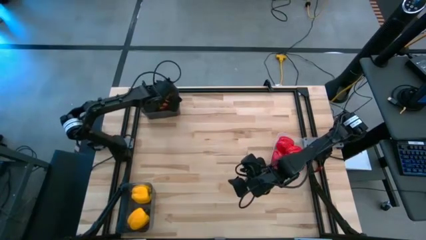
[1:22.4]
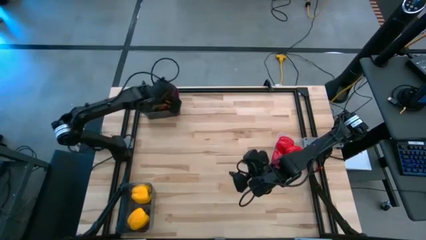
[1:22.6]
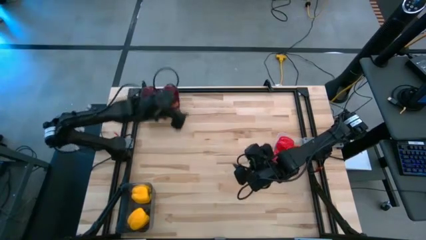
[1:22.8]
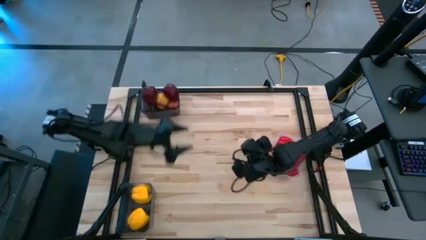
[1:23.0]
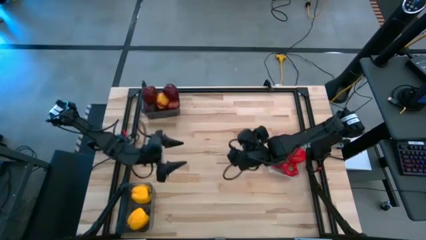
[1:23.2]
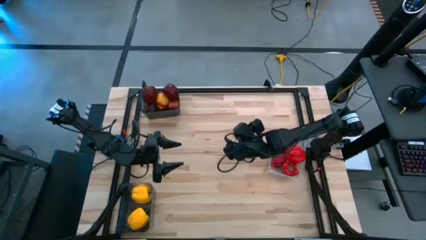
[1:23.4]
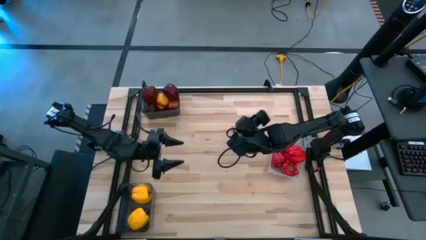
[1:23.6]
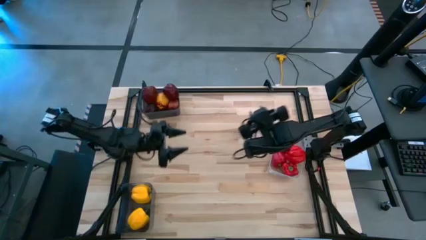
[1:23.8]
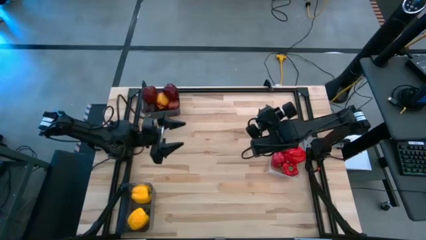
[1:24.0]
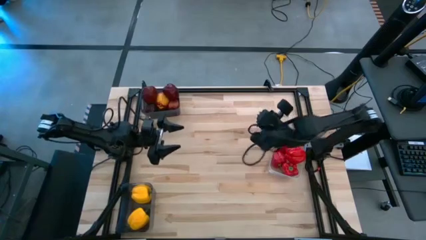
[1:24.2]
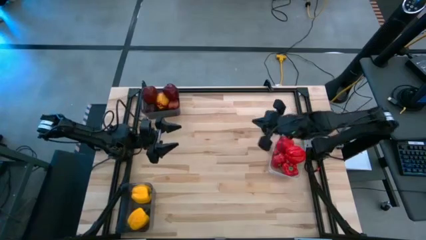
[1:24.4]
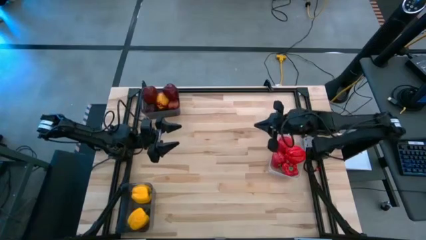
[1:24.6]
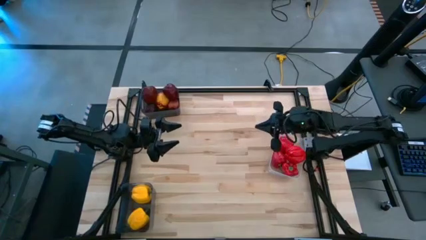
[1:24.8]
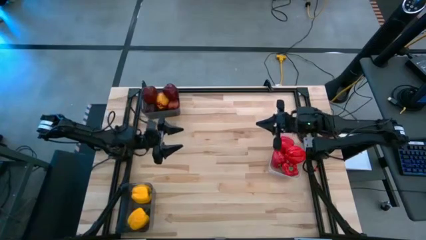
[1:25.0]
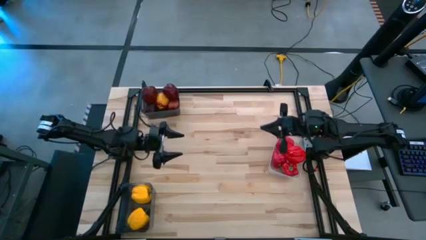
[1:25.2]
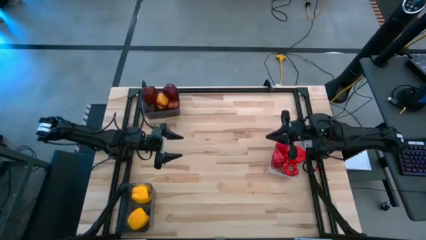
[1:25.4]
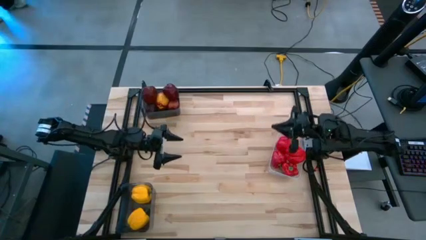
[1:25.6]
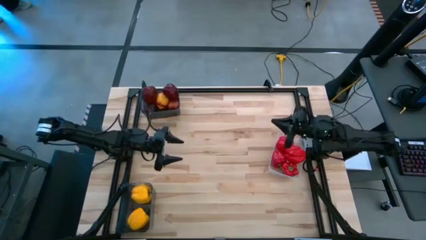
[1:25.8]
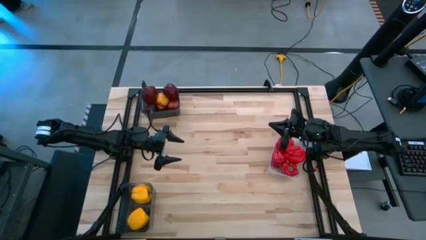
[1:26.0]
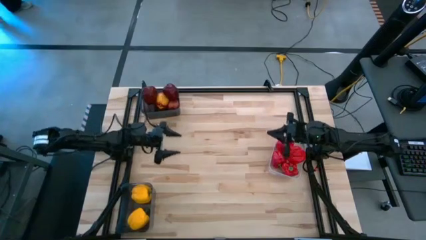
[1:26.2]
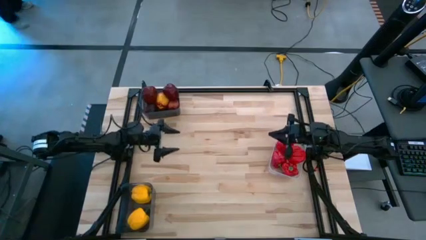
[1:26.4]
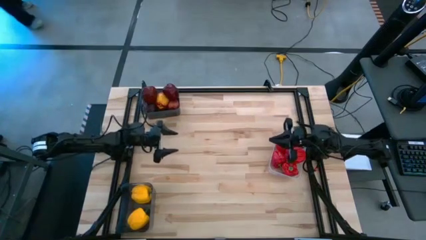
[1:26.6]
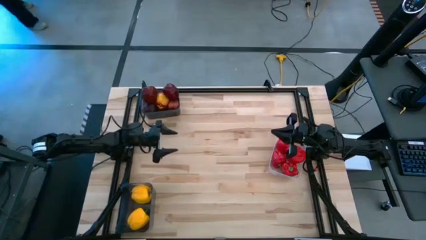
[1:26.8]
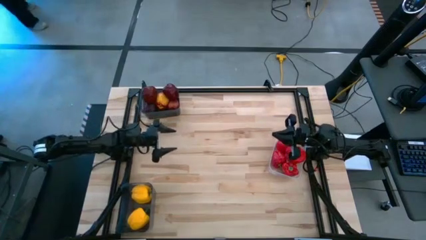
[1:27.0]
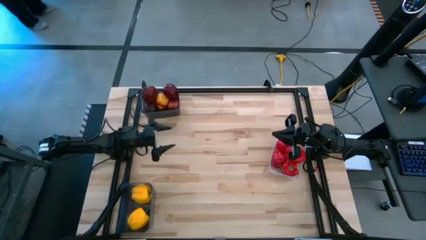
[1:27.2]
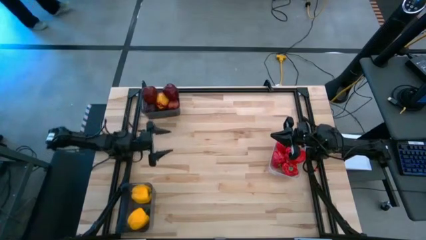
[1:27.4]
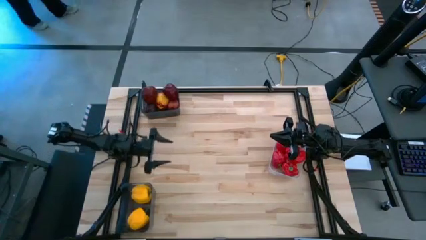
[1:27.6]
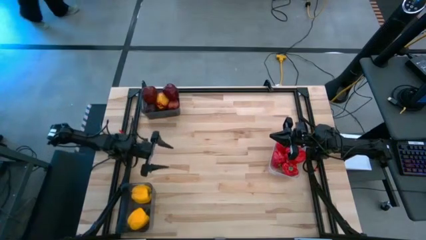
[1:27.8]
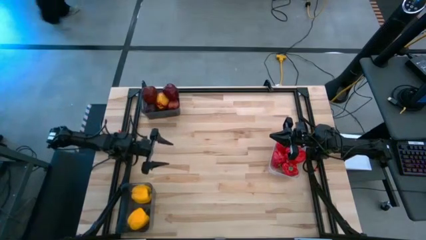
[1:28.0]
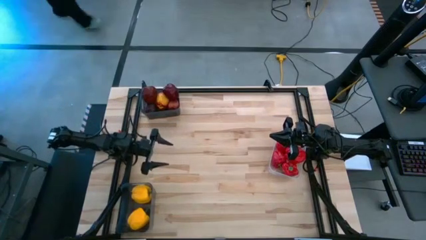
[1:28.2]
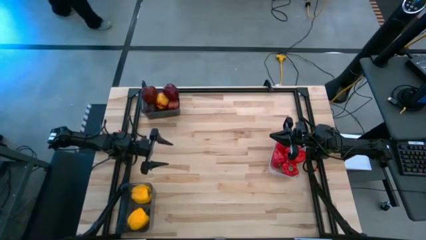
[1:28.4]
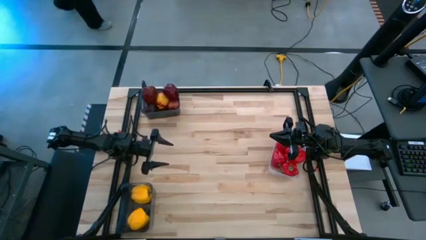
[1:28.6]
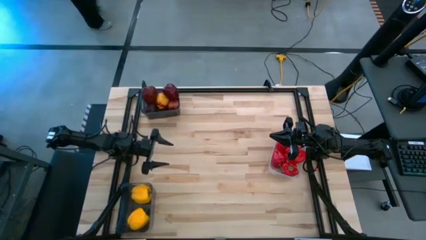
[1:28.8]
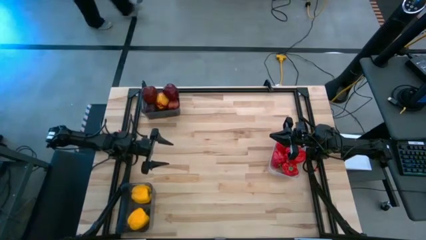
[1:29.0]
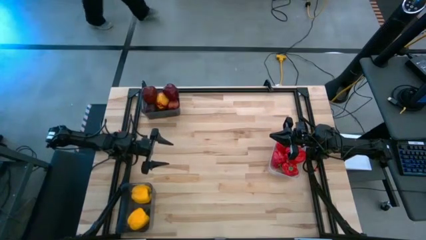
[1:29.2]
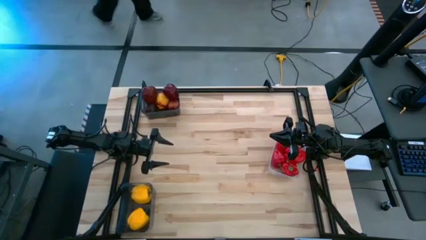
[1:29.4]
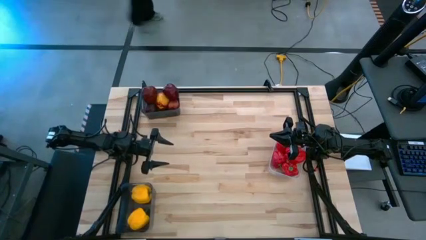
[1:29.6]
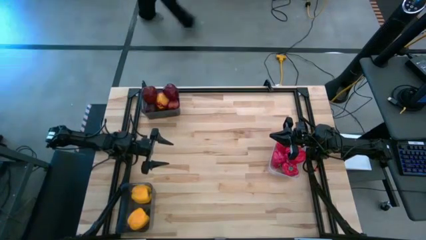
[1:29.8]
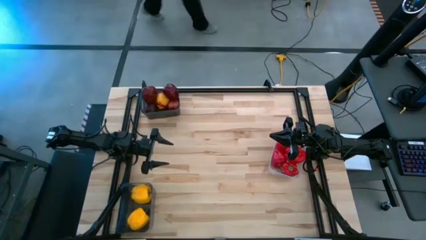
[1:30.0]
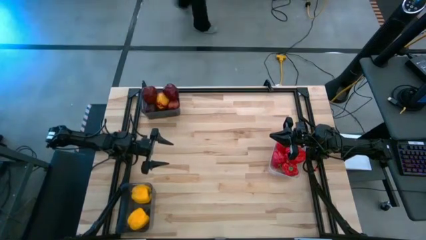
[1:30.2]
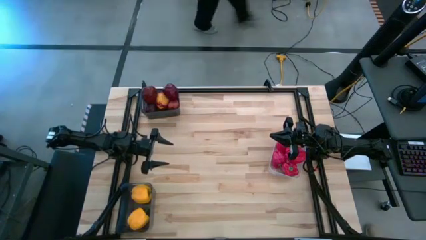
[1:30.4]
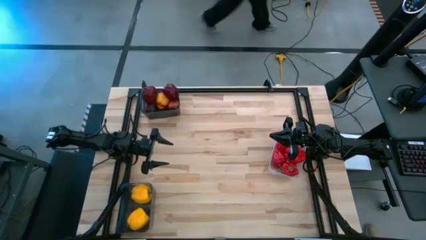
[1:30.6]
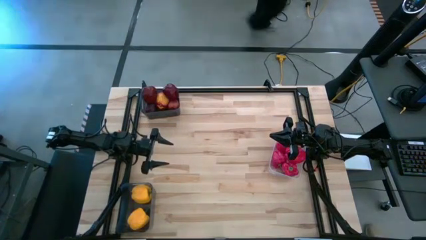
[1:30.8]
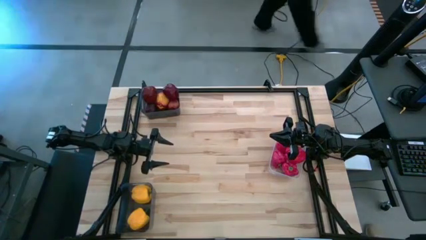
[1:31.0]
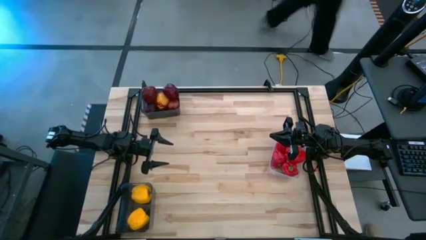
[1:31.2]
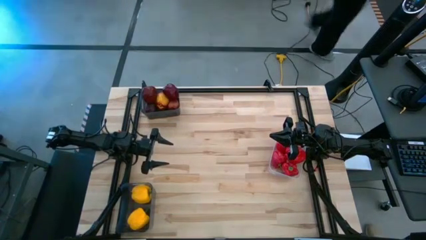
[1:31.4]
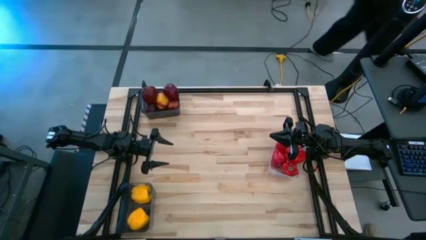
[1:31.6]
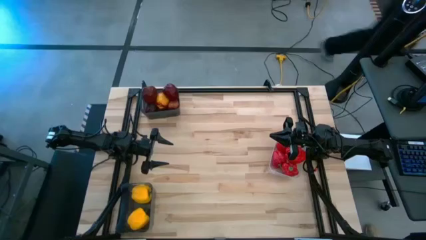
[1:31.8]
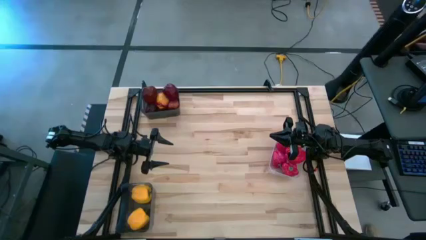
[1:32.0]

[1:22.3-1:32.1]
Task: Sort produce into baskets
Return to Home Position

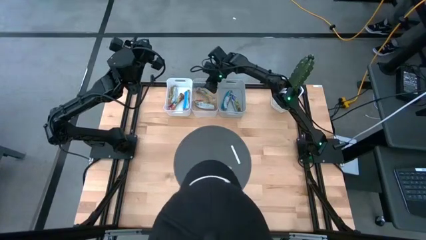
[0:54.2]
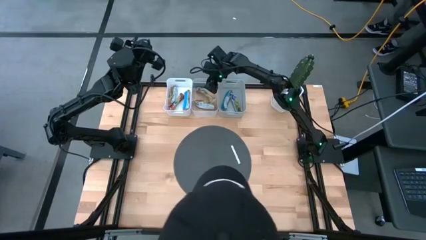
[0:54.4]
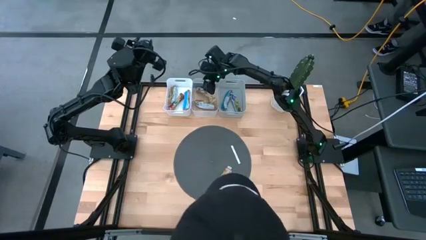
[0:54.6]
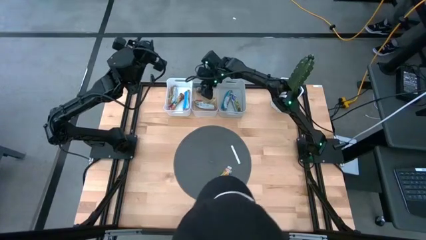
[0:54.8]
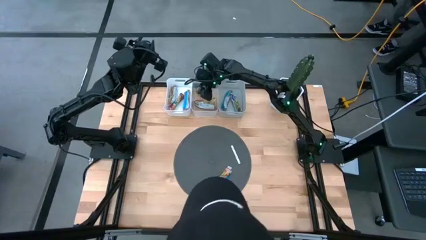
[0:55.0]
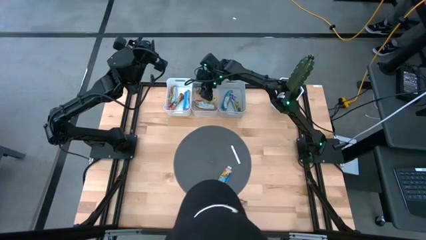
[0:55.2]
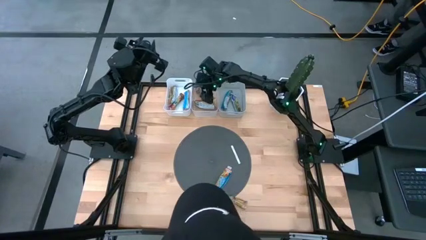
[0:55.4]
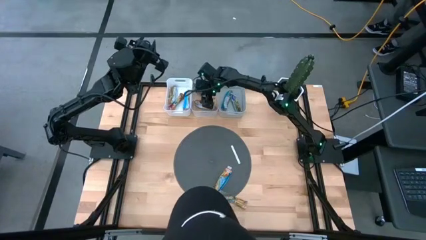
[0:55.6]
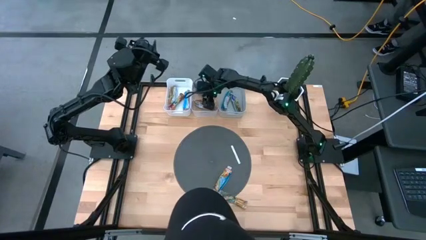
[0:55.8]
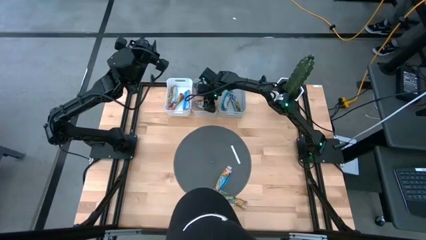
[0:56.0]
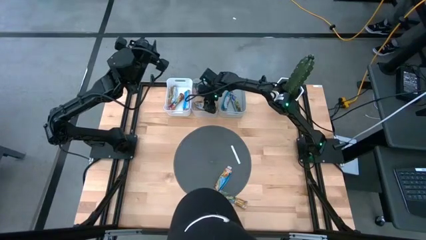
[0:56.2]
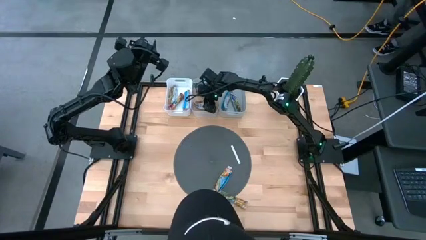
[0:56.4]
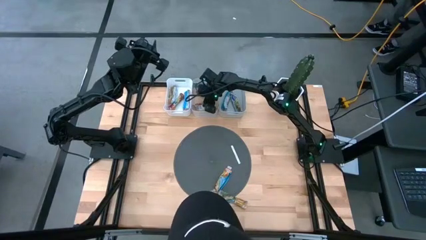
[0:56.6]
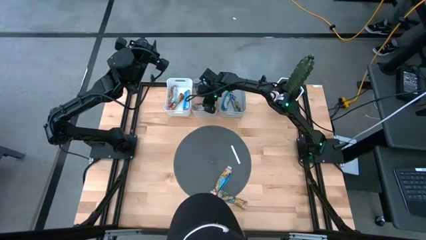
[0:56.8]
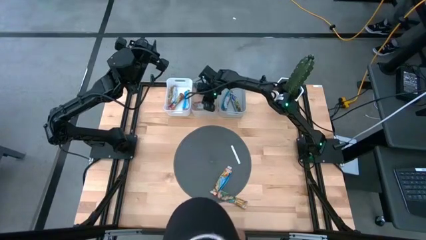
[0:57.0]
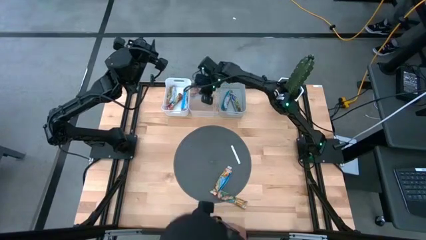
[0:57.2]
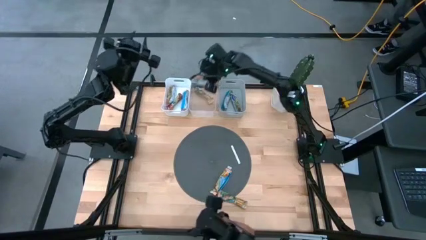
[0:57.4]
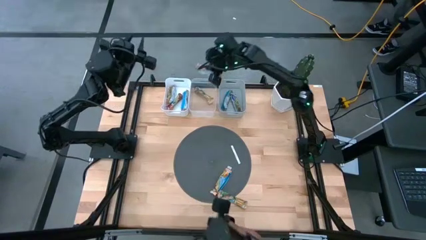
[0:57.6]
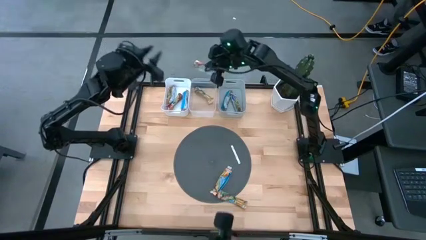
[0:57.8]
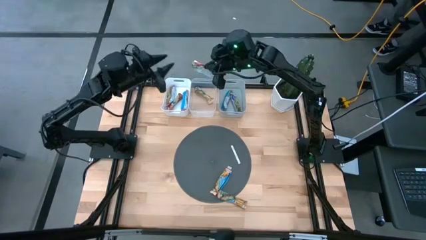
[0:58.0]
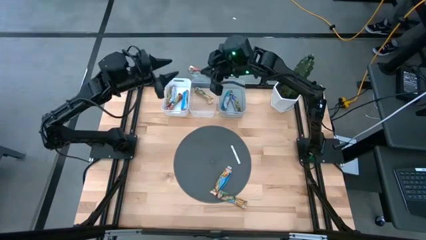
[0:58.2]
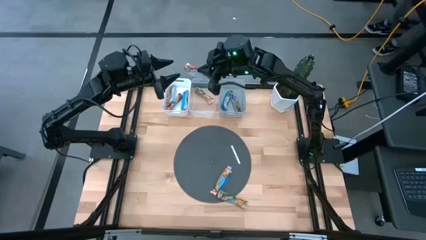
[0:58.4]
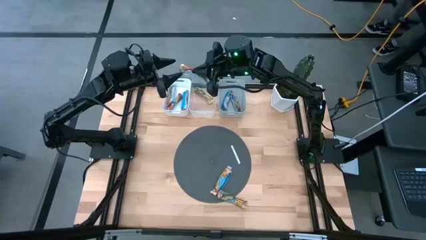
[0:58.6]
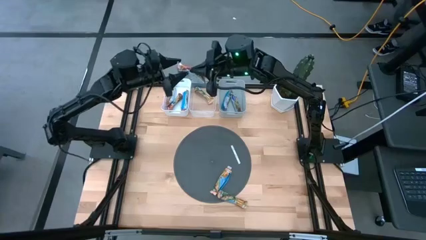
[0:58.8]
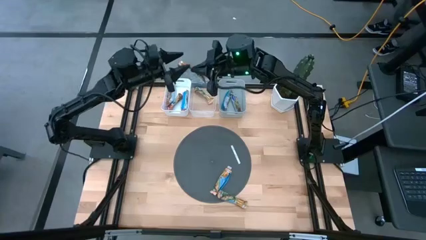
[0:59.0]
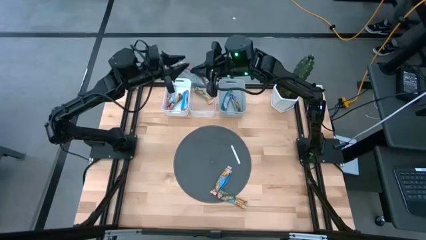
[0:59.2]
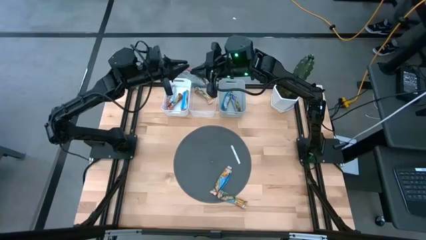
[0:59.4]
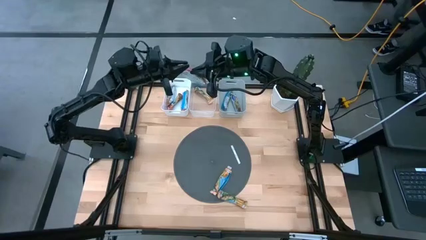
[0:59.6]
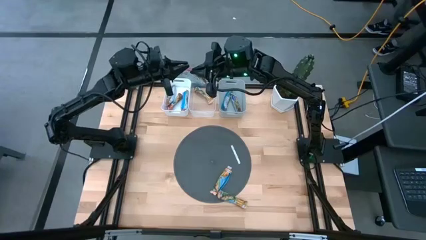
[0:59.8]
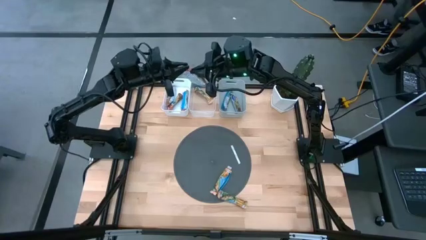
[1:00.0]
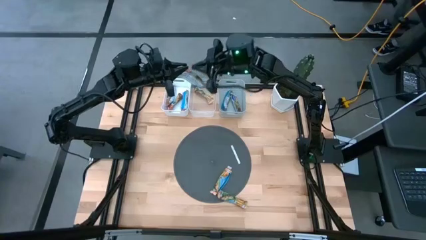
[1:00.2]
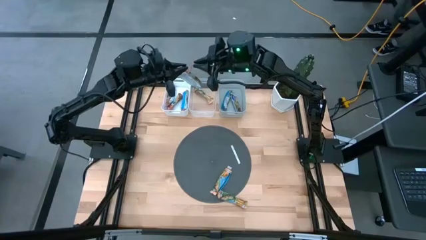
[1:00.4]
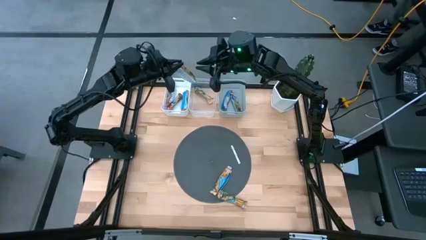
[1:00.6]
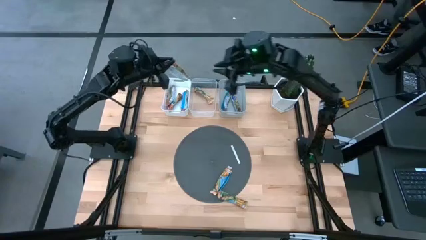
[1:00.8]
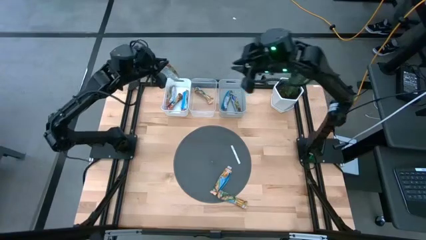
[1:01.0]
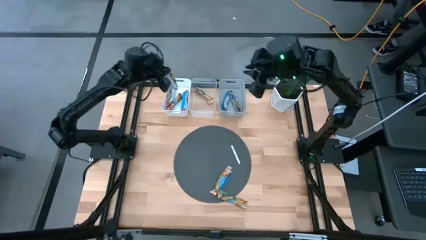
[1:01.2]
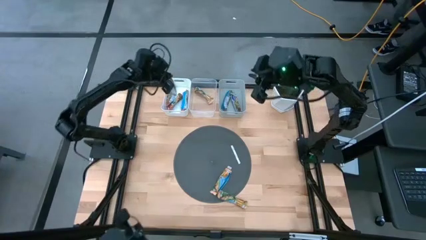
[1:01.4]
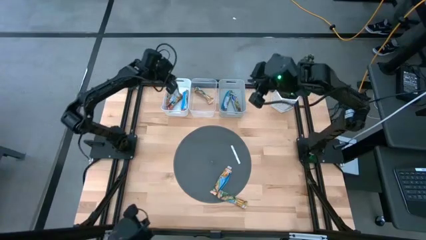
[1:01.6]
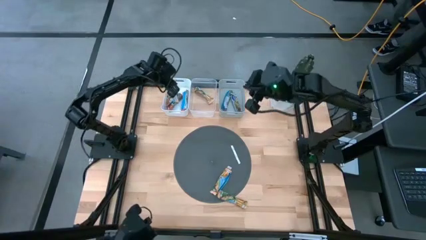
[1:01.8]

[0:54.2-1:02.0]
Task: Pick and place Granola Bars by type
Put the red granola bar into the white bin
